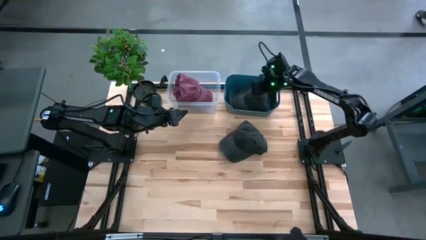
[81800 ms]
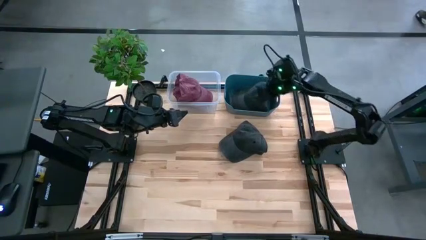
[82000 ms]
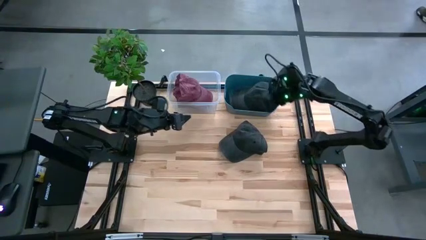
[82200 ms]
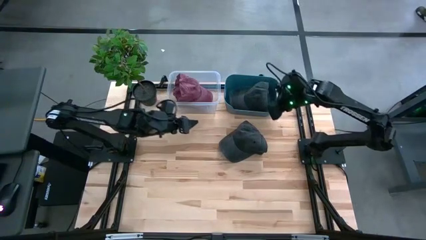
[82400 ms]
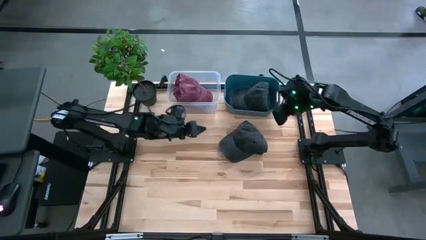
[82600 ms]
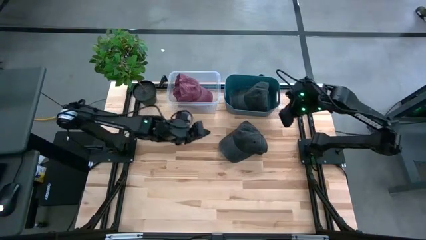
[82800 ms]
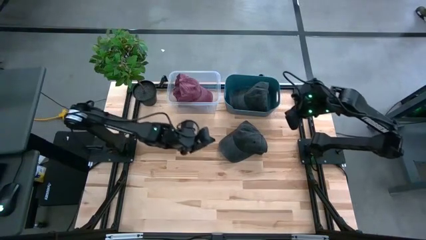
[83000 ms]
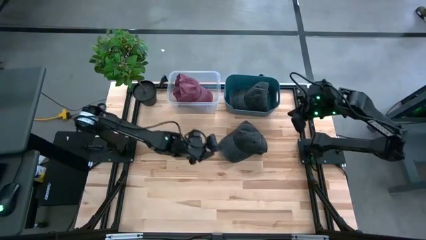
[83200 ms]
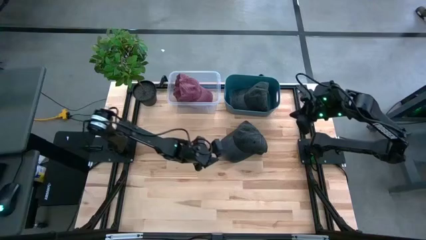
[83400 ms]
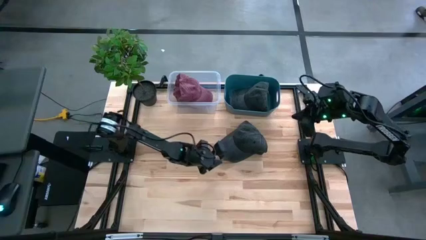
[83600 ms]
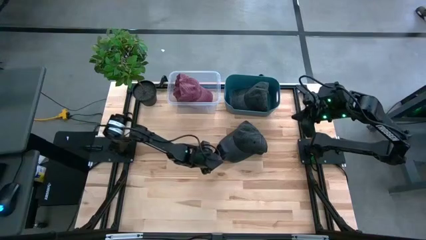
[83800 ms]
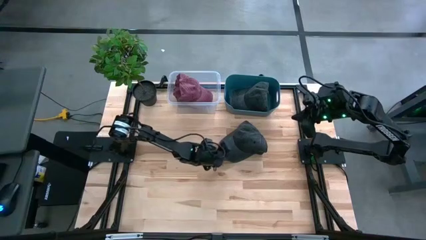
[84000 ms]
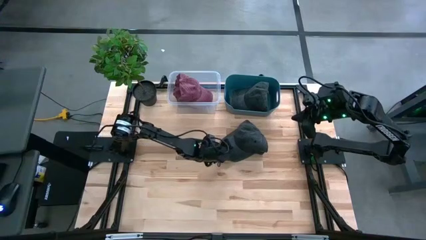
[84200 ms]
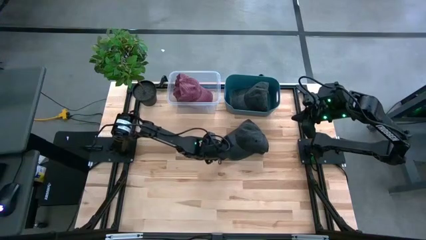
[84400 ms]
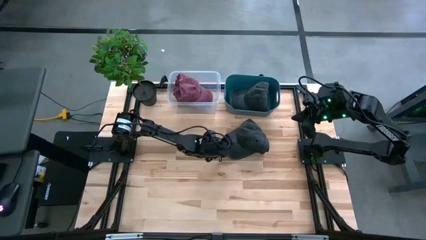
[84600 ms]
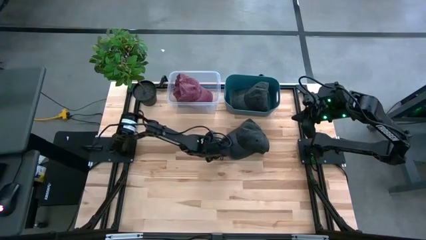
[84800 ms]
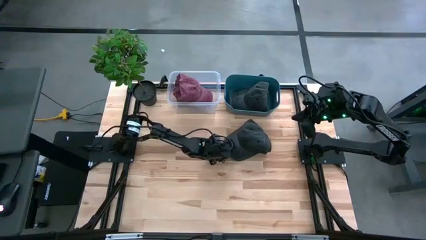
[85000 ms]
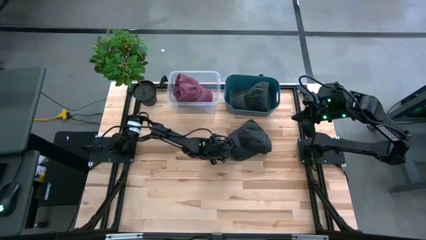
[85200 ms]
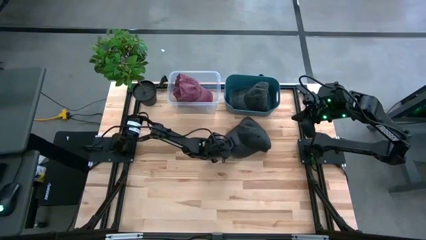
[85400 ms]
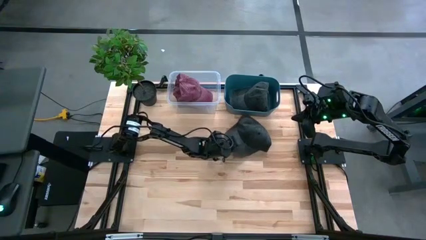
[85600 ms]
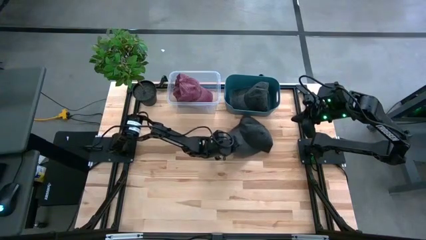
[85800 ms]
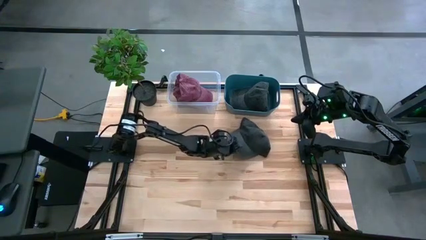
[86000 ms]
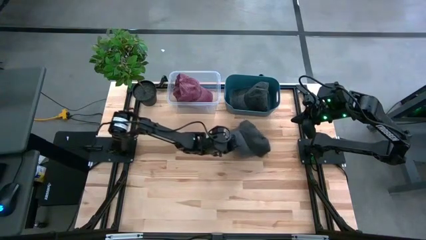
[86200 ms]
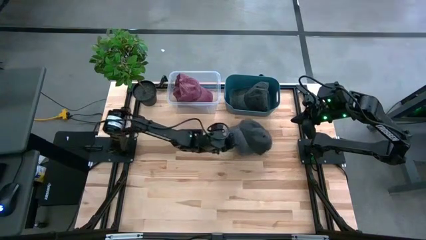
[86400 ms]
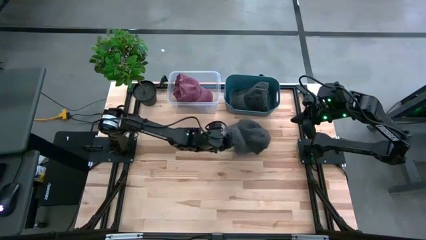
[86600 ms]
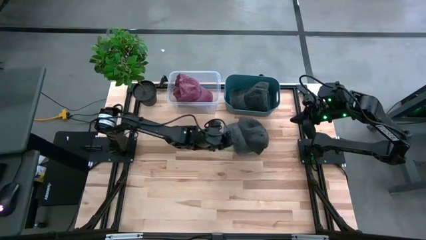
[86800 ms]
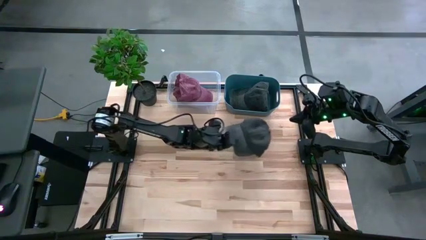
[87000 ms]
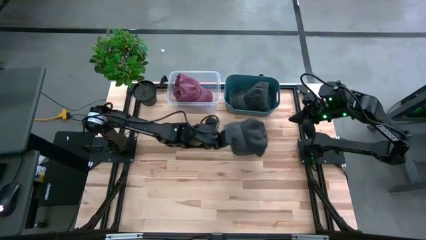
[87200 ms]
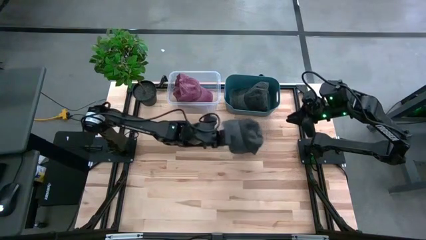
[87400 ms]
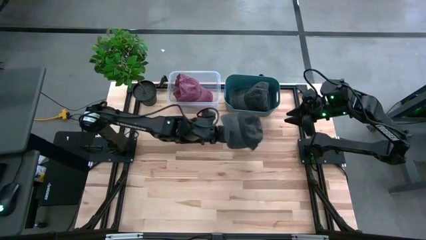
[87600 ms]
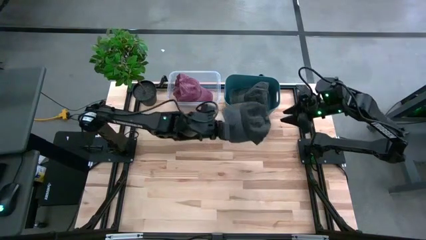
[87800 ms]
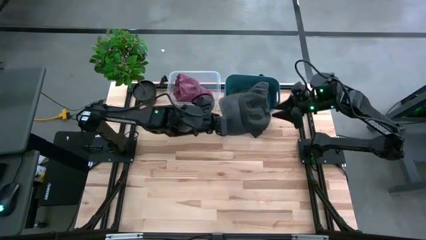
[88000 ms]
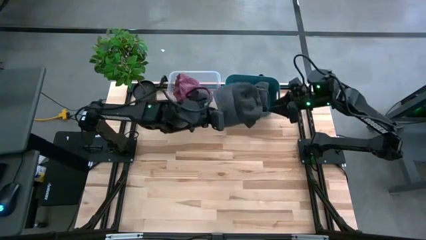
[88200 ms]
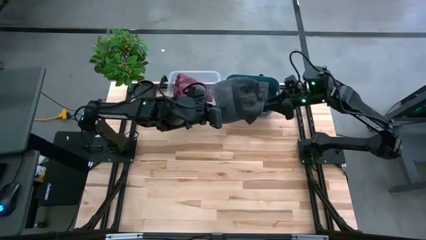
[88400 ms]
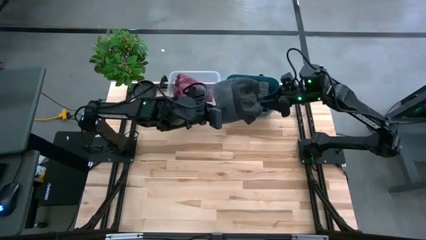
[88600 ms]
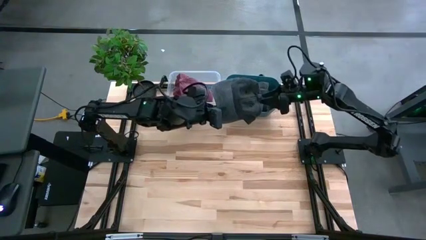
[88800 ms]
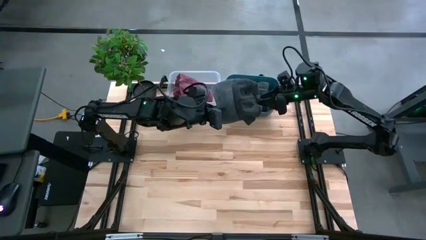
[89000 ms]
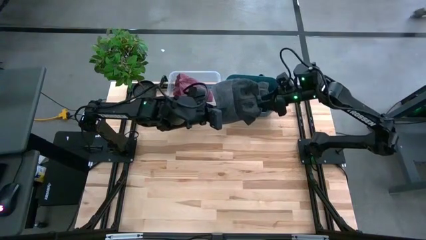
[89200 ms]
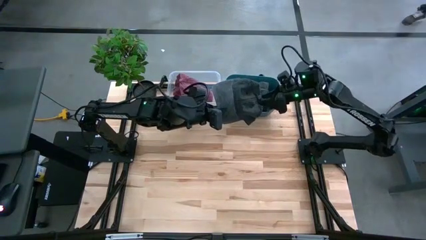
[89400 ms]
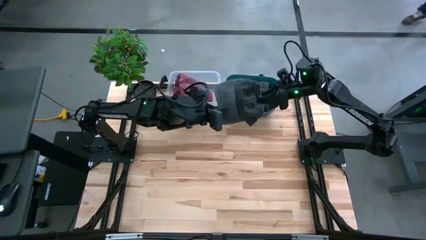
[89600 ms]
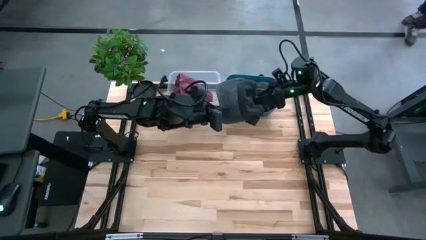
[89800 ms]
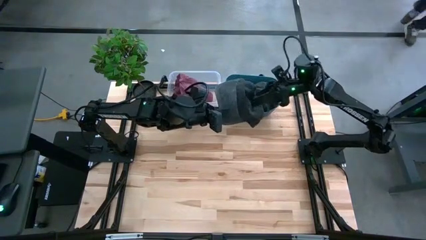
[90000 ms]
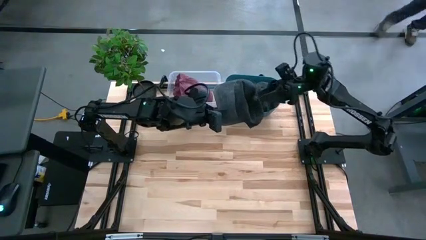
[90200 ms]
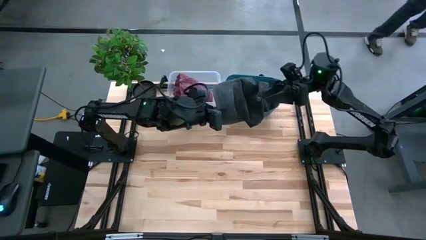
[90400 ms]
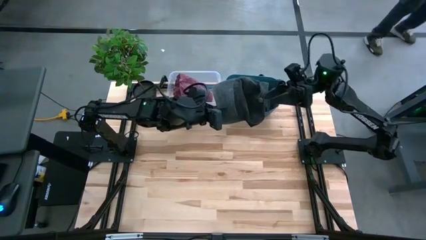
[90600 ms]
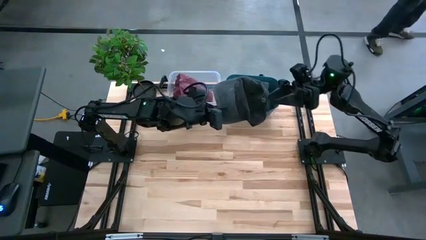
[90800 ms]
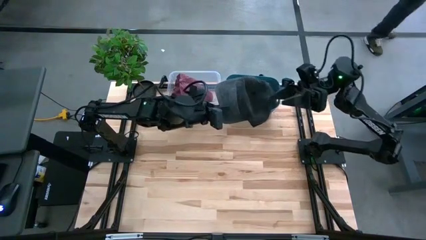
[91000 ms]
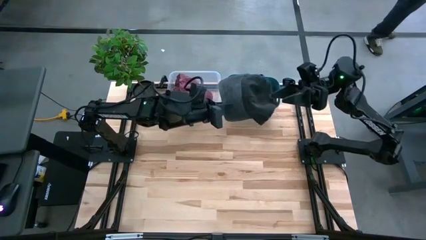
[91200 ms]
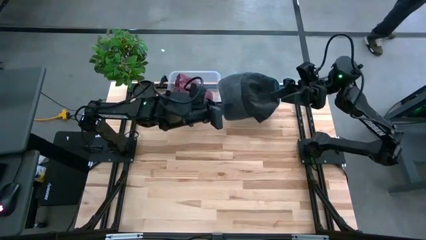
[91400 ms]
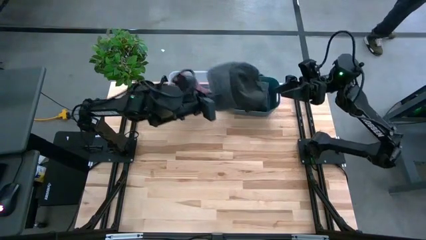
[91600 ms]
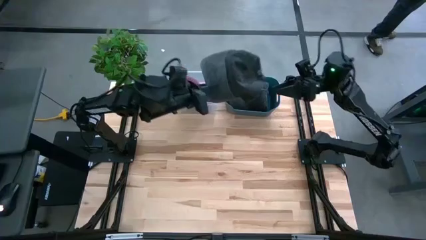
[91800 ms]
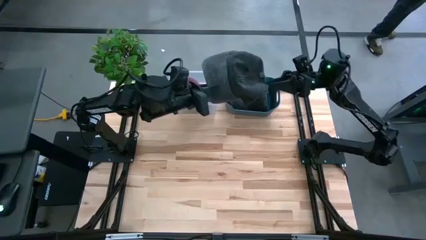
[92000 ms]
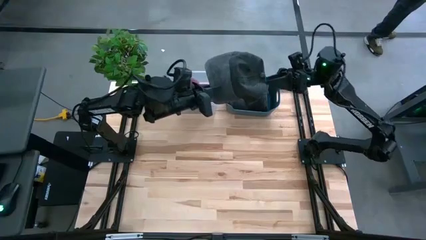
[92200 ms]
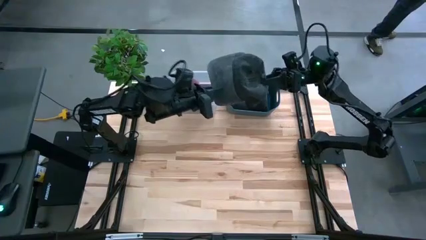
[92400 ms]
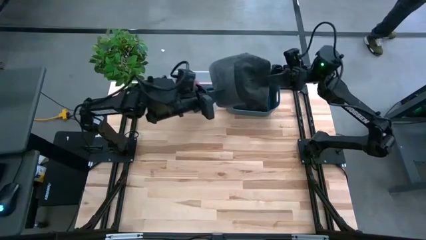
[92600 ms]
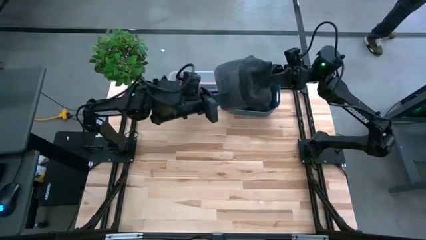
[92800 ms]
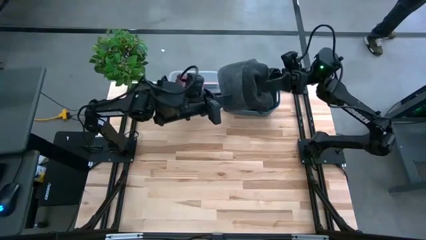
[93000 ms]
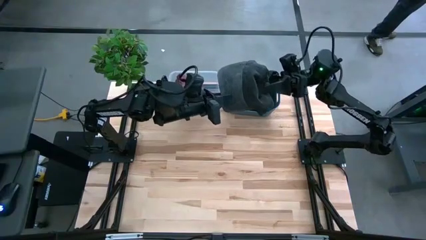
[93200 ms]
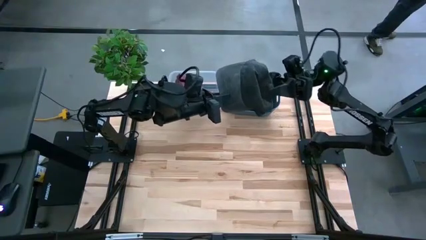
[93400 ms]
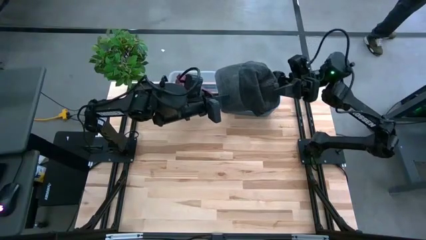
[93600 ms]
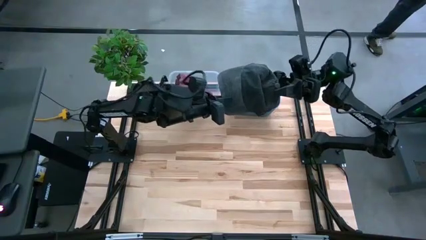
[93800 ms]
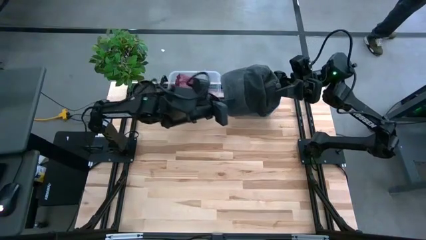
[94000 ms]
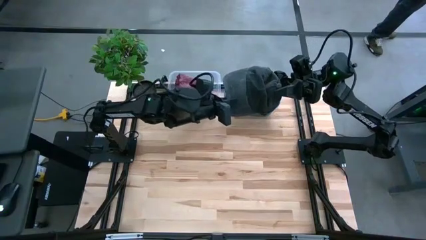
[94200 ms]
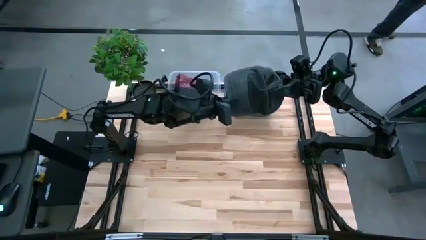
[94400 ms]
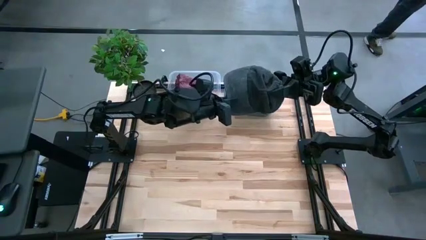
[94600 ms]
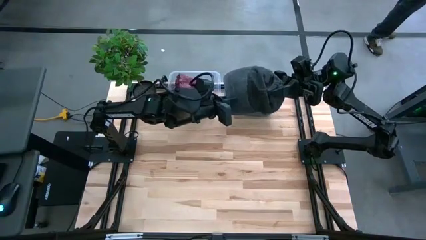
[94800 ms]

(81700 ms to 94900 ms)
Task: Pick & Place hat
Put the black cap into the blue bin
